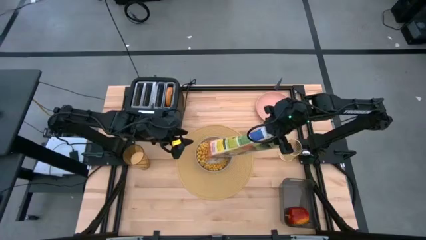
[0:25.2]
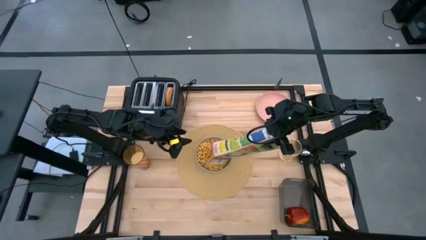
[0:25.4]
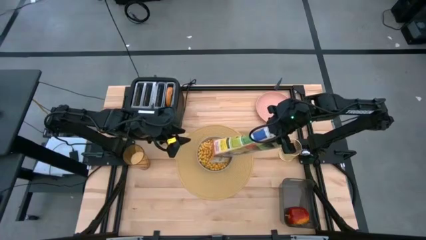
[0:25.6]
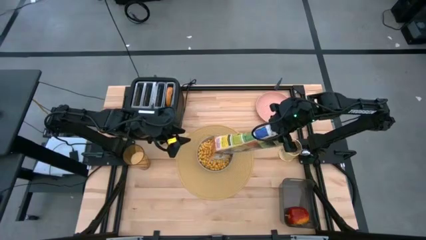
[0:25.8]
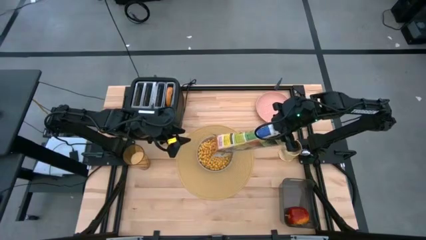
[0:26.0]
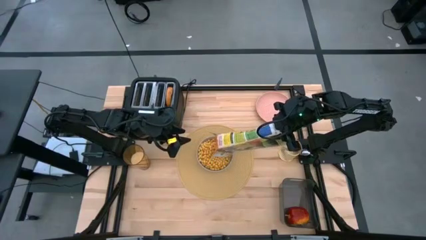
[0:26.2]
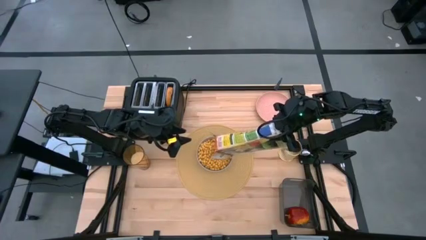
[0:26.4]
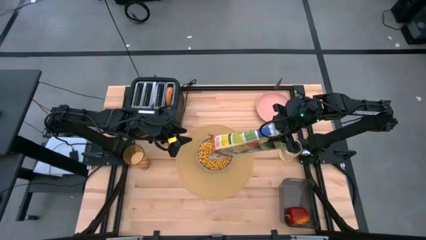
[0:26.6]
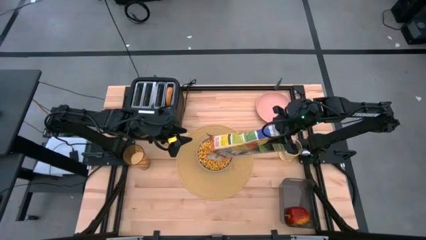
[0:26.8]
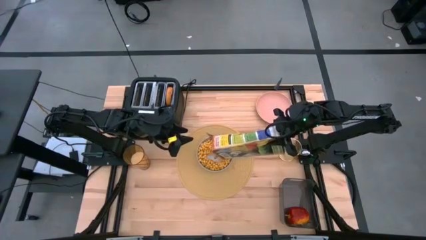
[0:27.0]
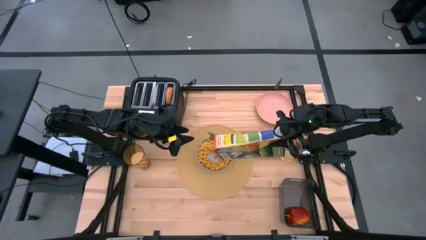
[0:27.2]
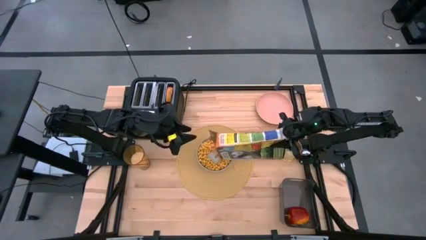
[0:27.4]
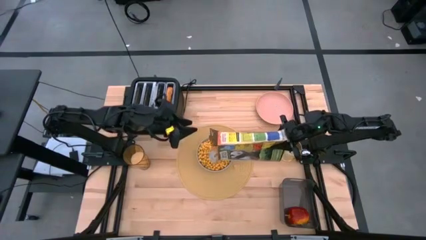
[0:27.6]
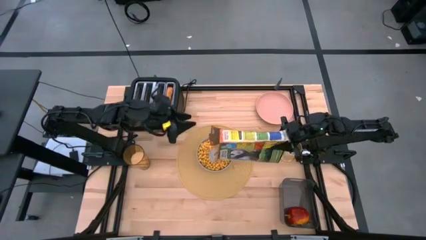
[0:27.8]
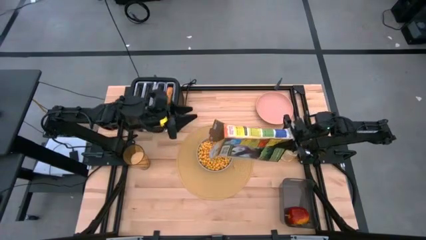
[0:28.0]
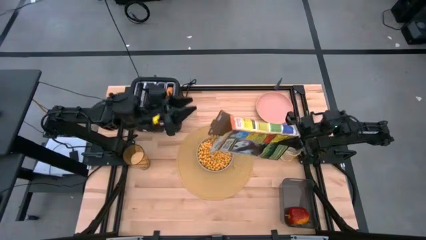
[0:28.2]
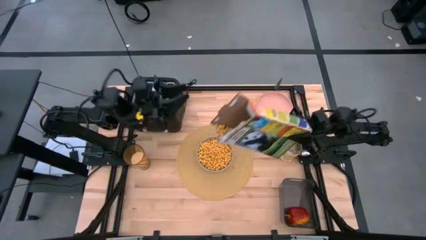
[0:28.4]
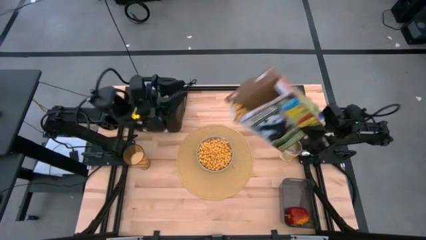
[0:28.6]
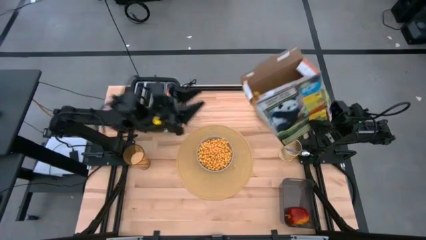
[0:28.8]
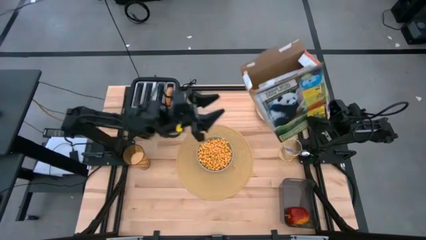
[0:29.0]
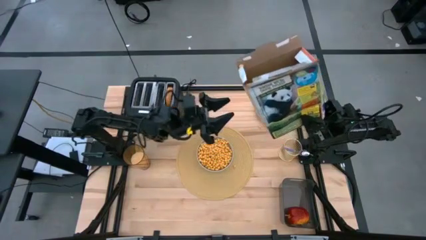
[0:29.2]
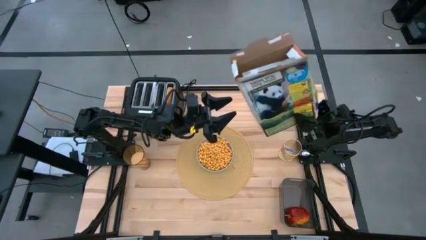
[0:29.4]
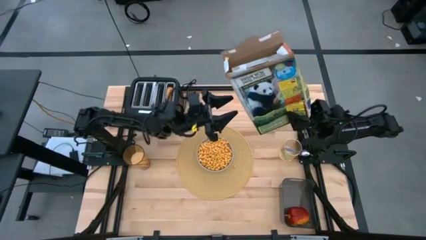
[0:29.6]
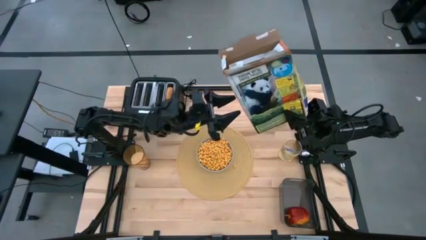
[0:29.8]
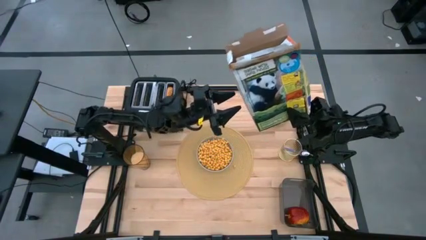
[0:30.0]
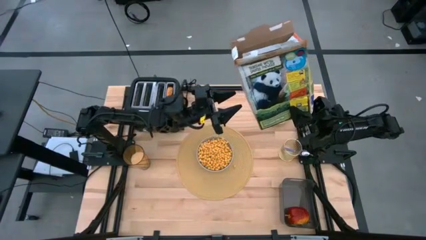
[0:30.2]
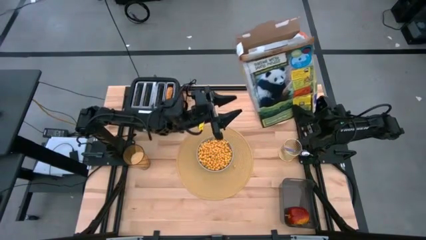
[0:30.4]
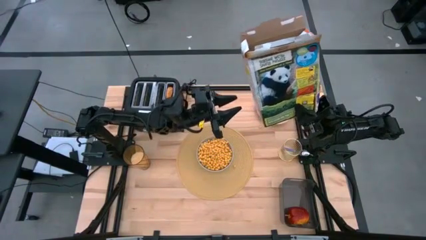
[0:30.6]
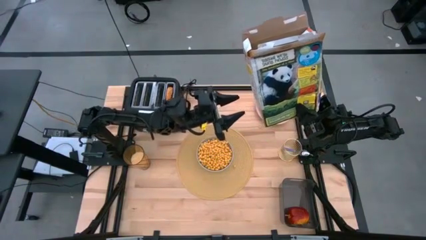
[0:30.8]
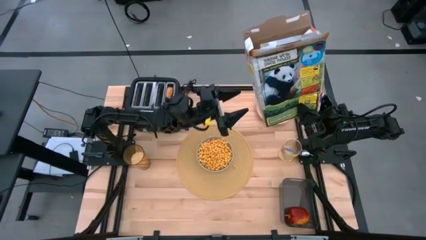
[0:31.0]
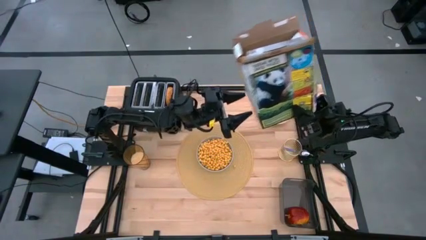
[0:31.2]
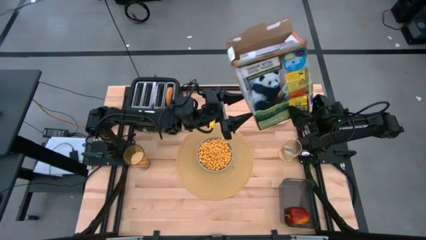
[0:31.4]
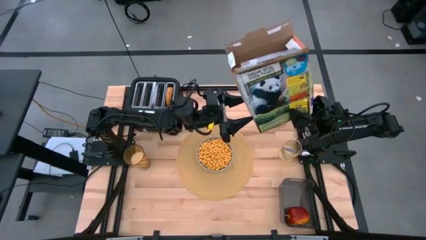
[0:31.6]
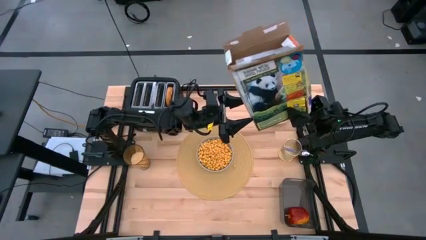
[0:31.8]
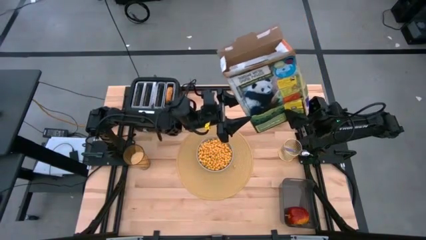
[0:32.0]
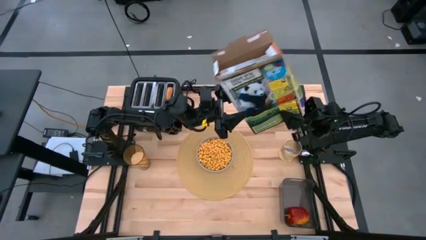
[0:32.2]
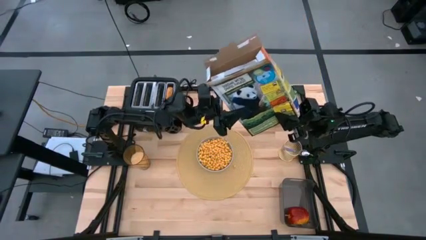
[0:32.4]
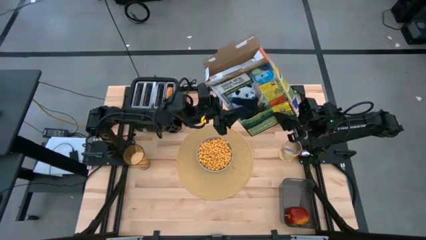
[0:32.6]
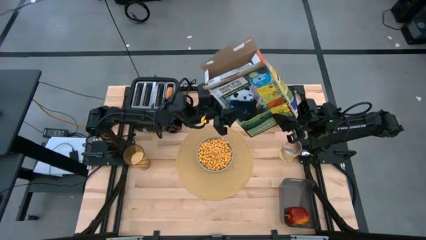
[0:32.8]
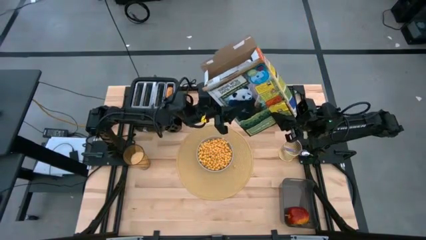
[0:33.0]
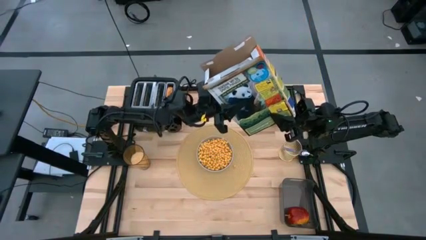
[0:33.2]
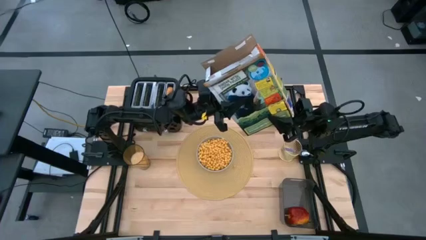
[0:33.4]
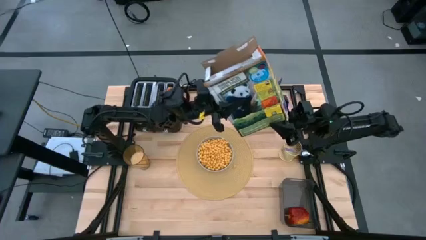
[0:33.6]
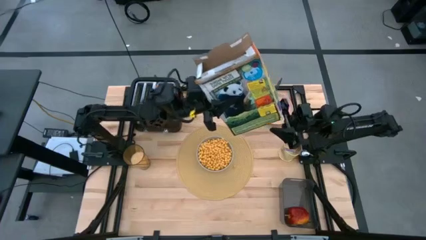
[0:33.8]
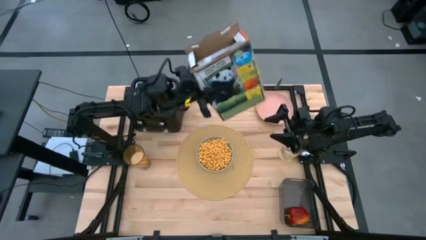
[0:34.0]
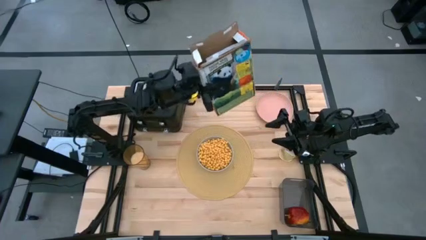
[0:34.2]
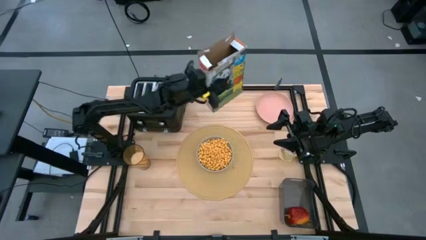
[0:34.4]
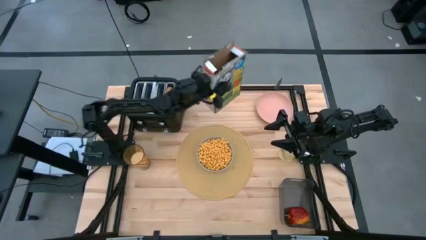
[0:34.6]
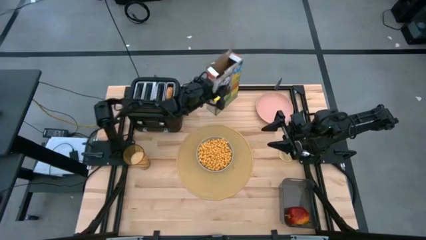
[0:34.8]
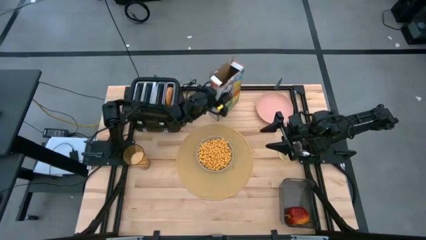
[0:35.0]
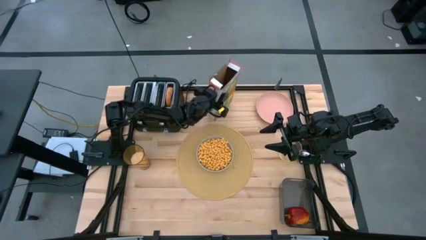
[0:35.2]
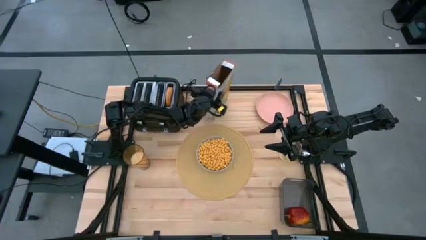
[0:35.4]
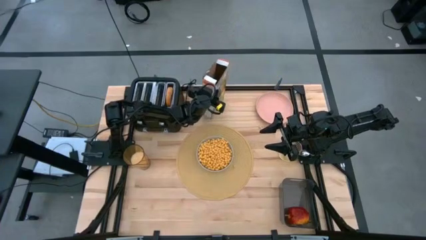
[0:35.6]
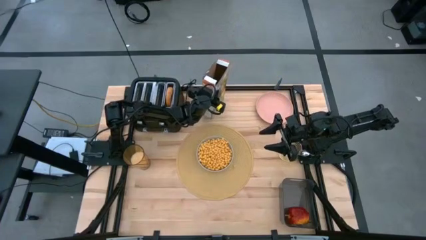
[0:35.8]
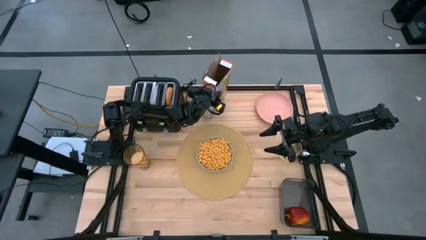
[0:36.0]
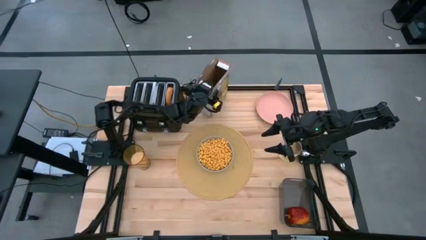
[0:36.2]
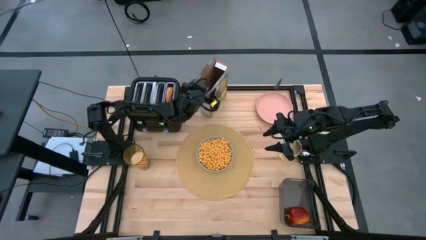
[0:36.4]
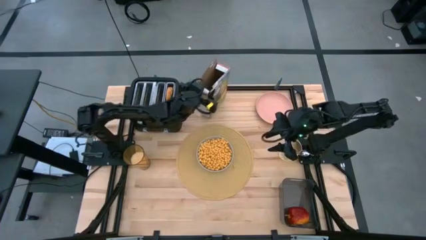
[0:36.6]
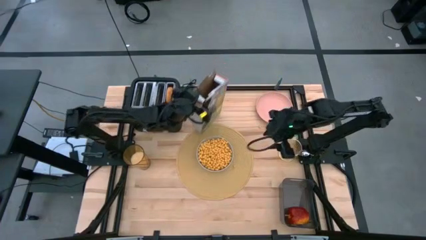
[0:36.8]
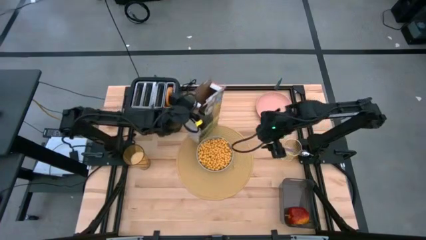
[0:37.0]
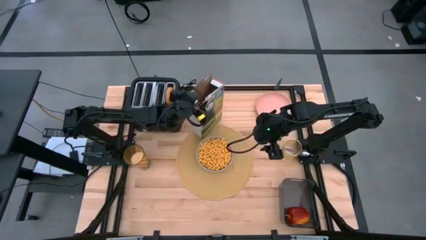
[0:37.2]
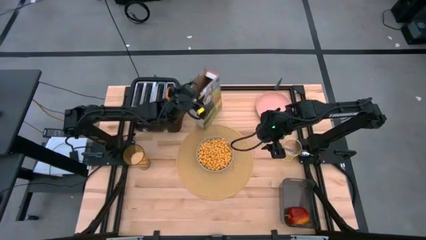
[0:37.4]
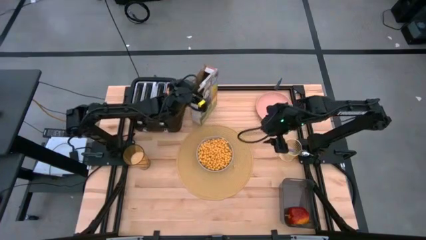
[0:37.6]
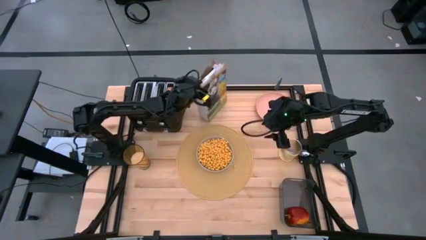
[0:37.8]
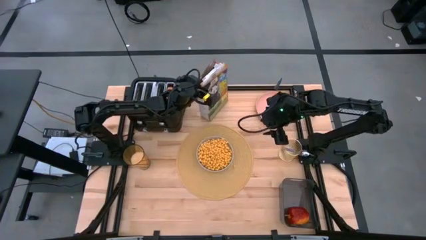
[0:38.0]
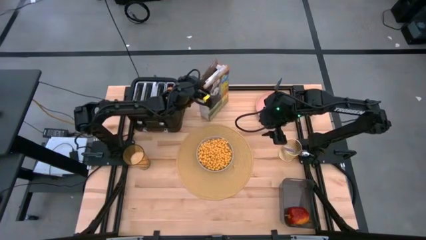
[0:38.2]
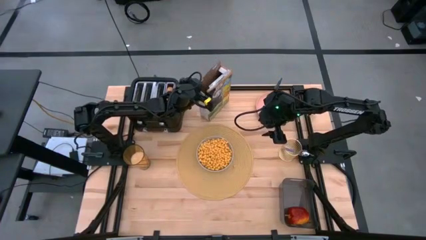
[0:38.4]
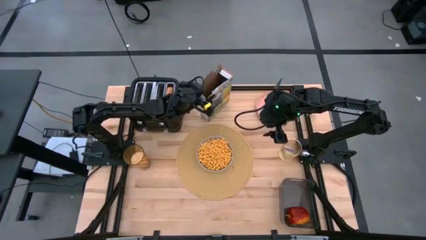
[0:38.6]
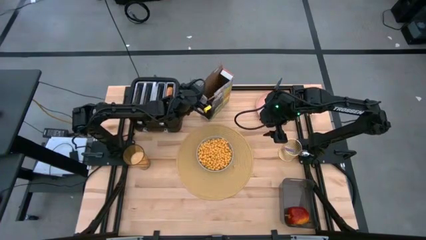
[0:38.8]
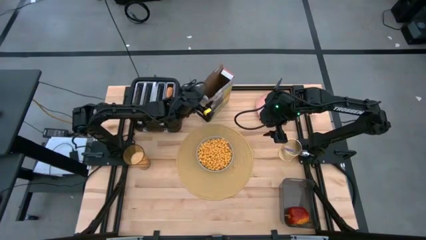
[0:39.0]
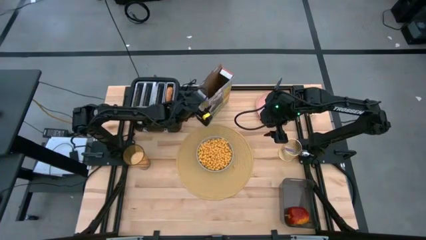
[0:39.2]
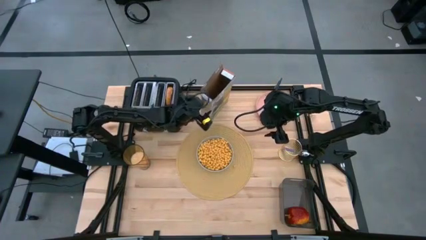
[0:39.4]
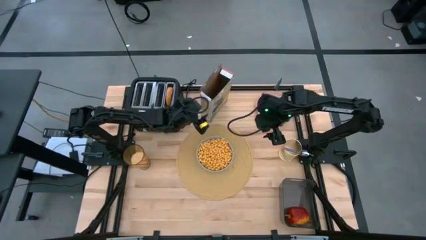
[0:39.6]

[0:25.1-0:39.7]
Task: Arrange a breakfast setting
Pour the cereal from the cereal box into the gray bowl

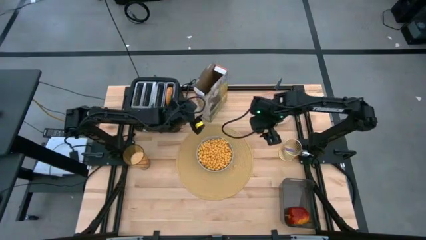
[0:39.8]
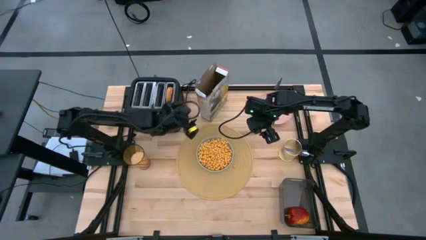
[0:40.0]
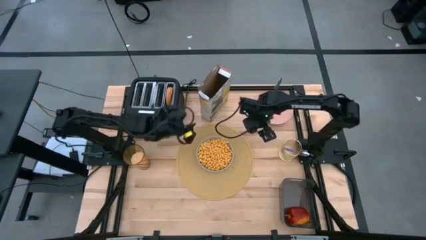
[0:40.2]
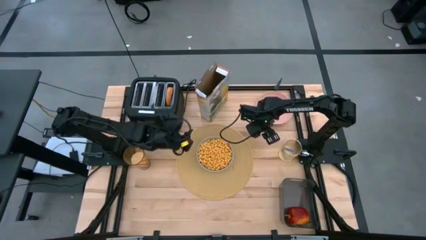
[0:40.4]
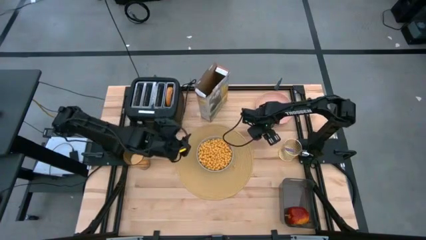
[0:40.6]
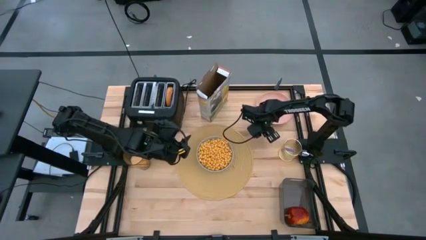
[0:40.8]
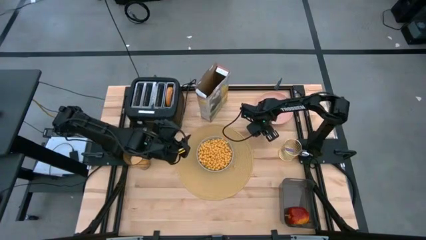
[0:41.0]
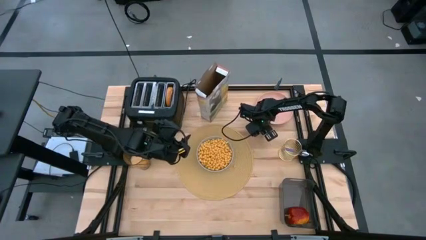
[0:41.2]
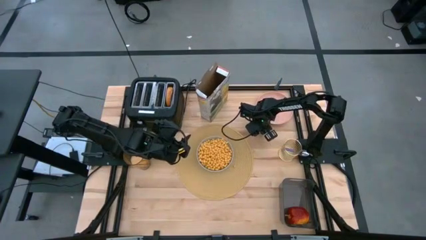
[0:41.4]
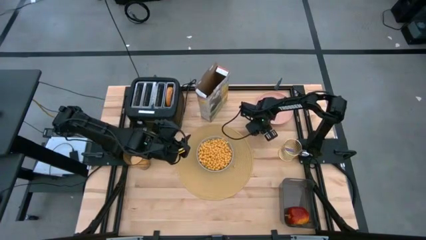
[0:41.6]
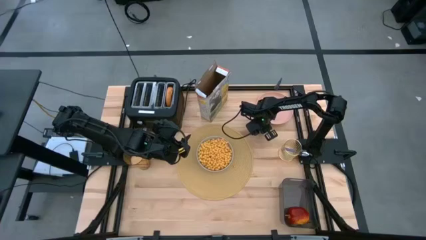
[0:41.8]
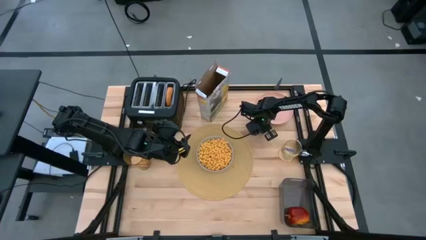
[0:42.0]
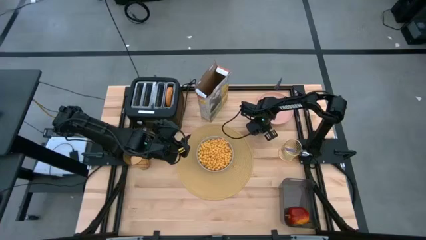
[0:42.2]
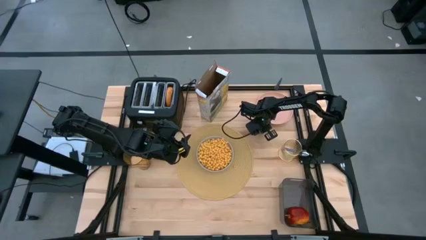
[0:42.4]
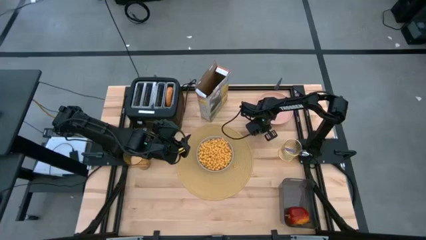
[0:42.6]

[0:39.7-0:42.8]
Put the yellow cereal into the gray bowl
